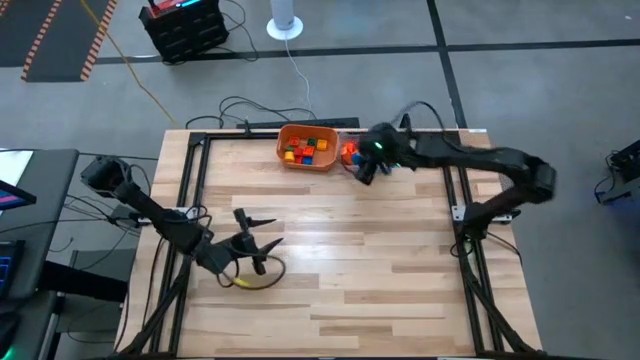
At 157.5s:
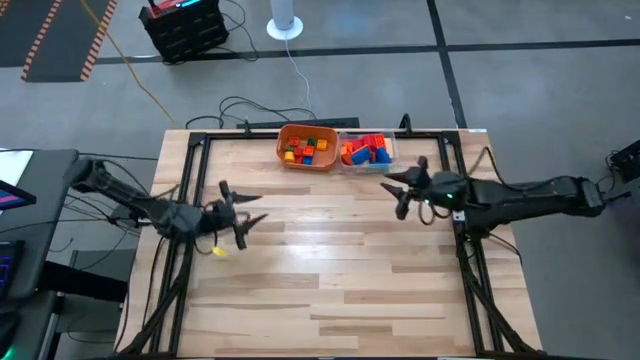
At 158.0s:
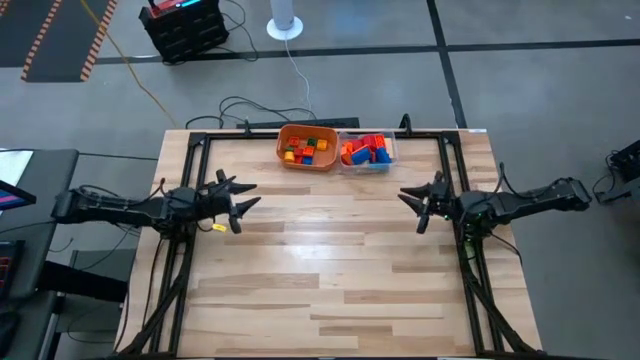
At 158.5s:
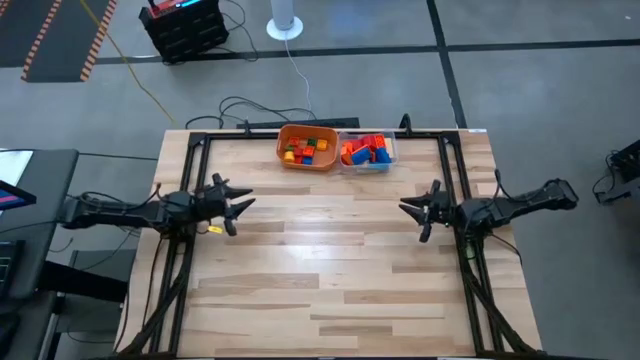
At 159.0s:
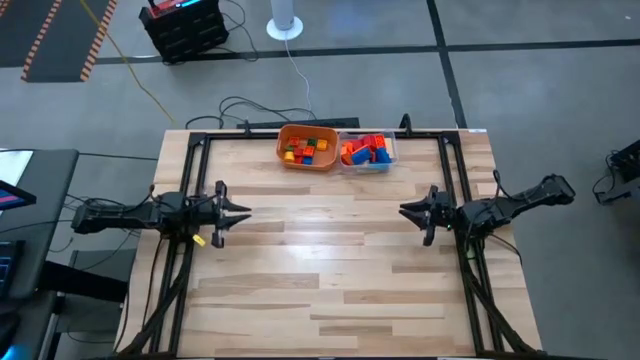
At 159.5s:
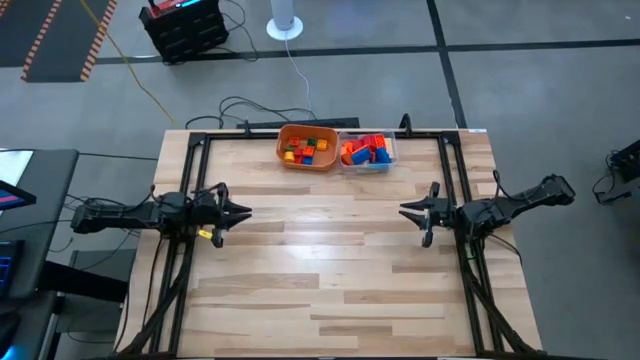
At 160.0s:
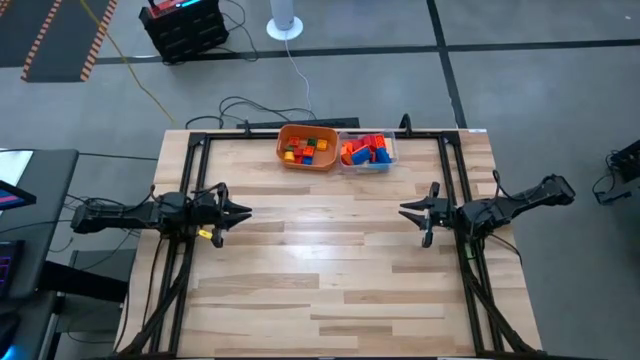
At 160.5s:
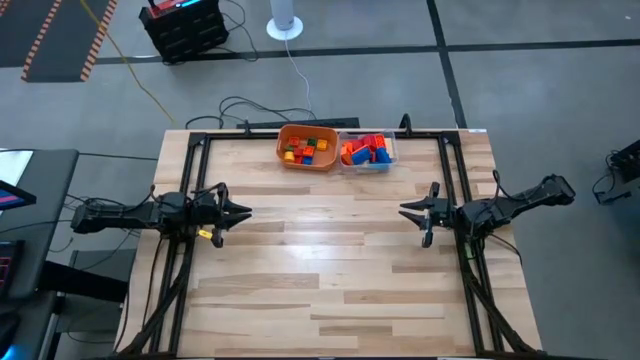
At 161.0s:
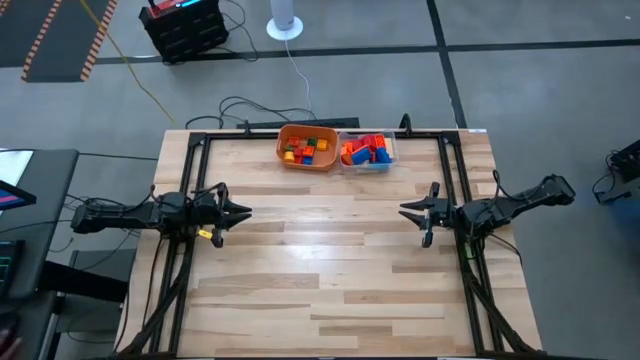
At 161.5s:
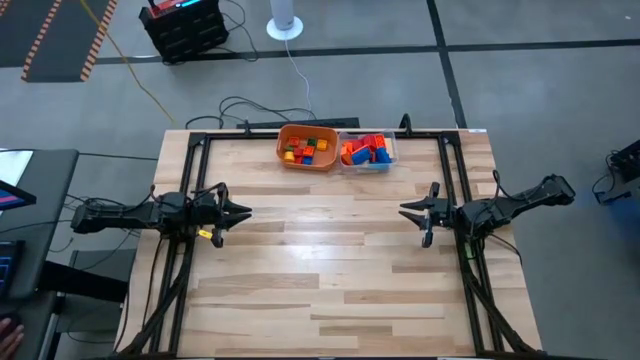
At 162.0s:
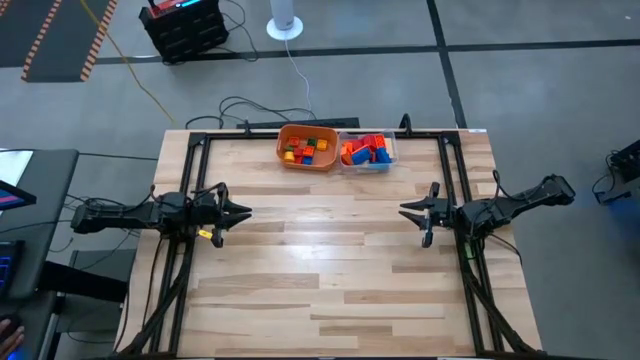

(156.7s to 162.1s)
Task: Sort blocks by size
Return to Home Position

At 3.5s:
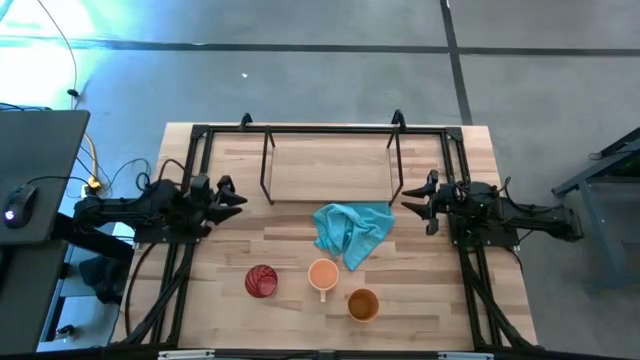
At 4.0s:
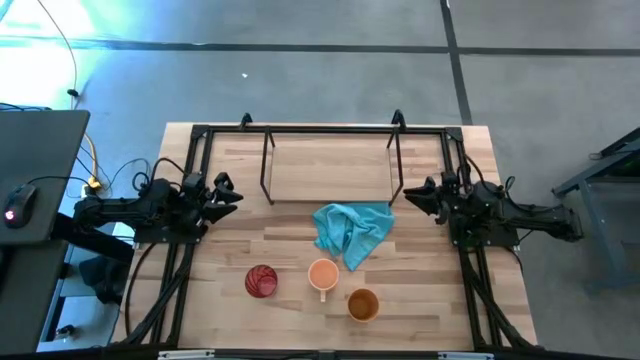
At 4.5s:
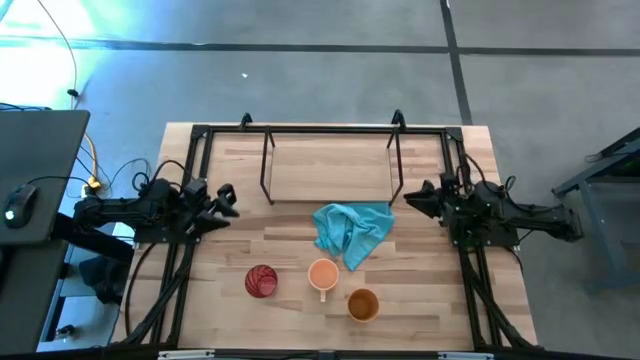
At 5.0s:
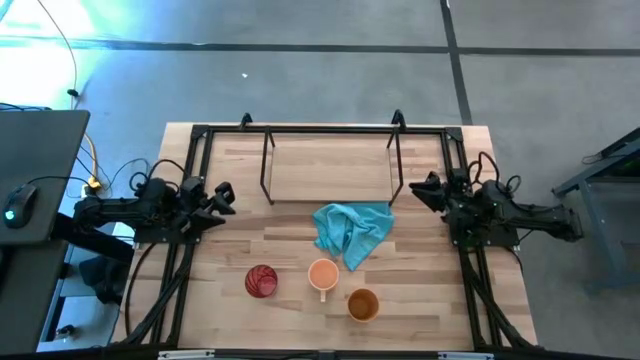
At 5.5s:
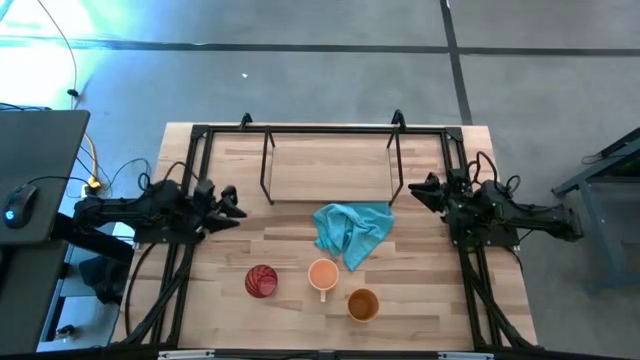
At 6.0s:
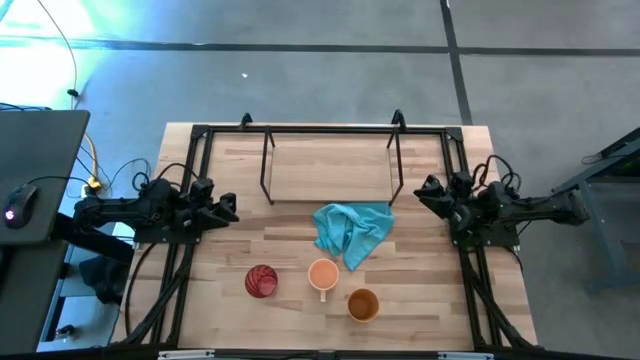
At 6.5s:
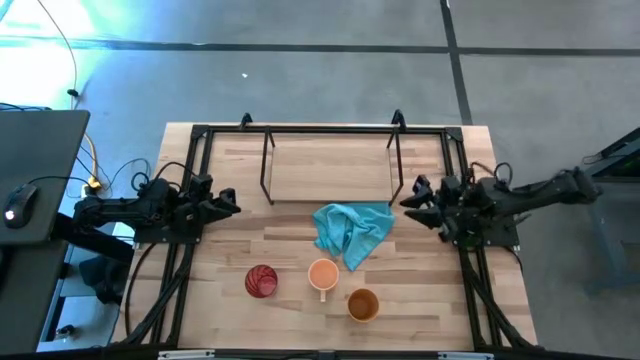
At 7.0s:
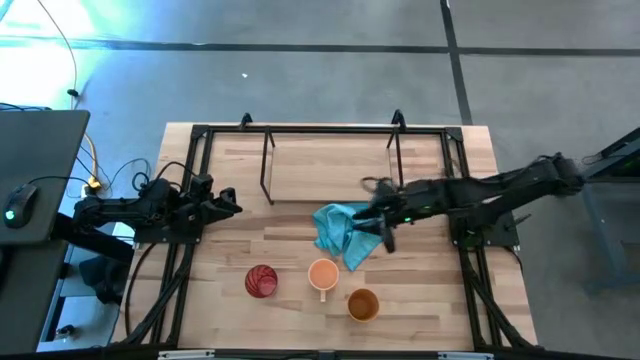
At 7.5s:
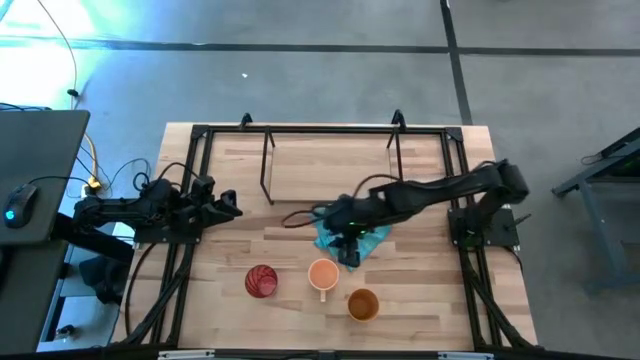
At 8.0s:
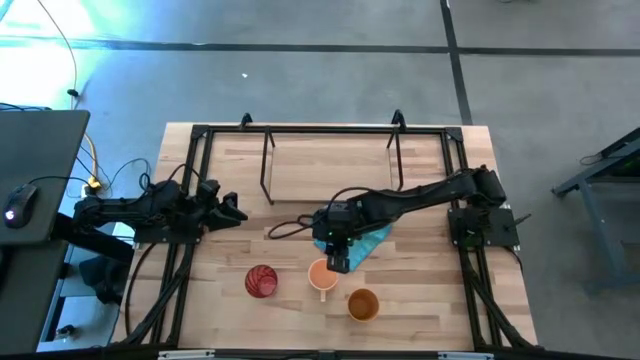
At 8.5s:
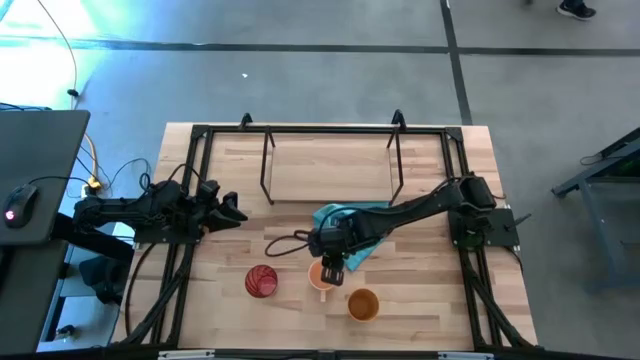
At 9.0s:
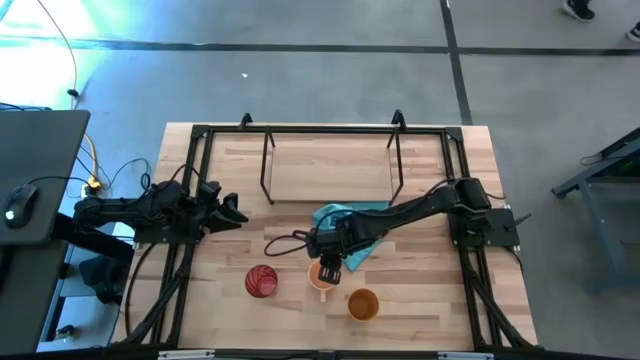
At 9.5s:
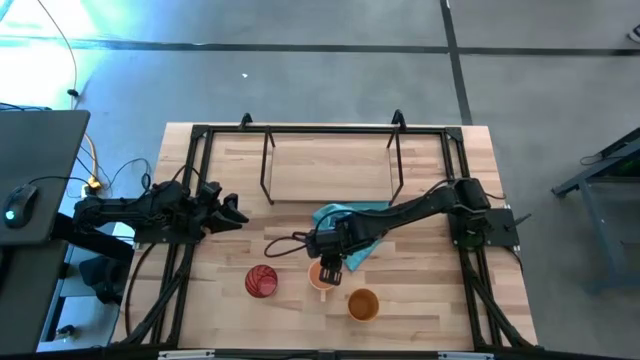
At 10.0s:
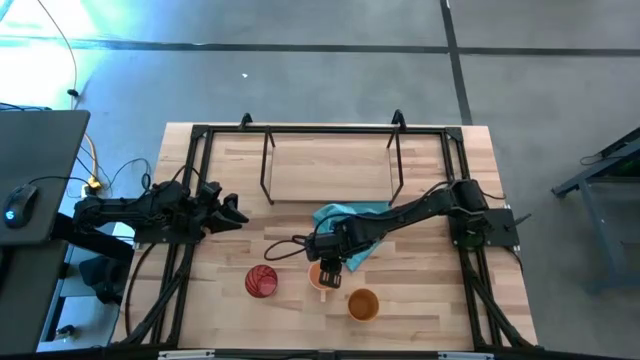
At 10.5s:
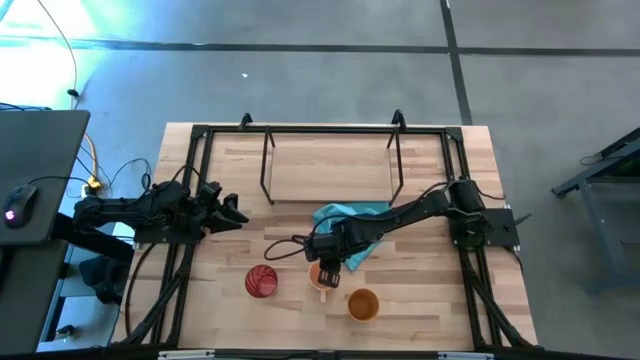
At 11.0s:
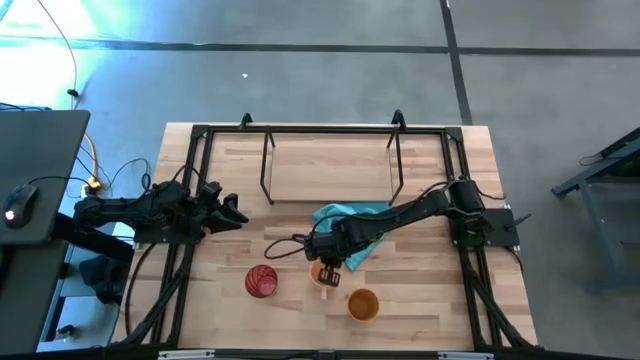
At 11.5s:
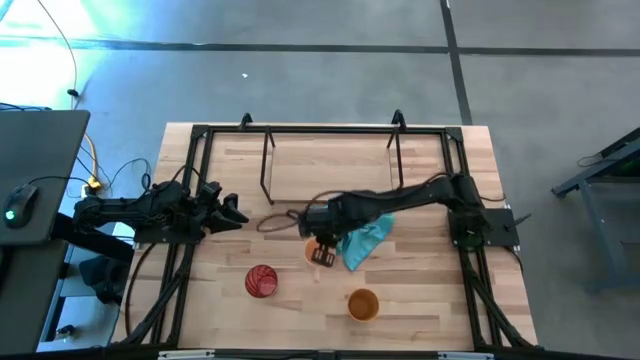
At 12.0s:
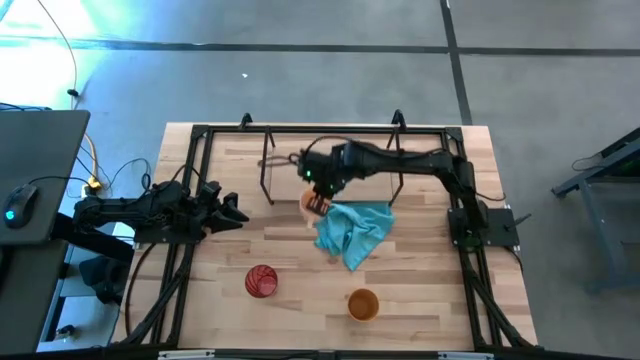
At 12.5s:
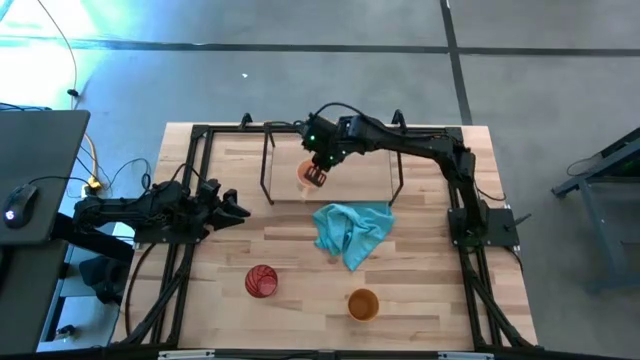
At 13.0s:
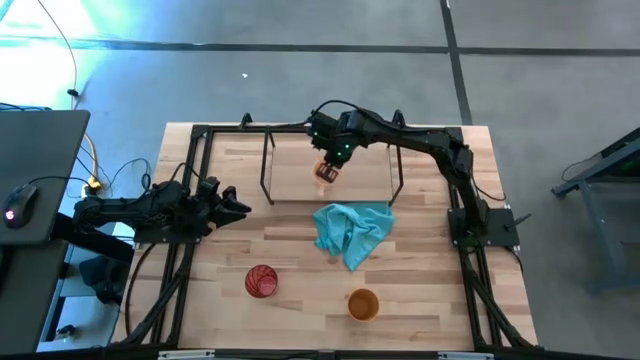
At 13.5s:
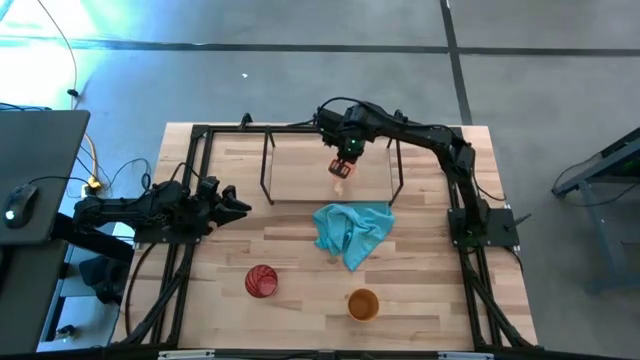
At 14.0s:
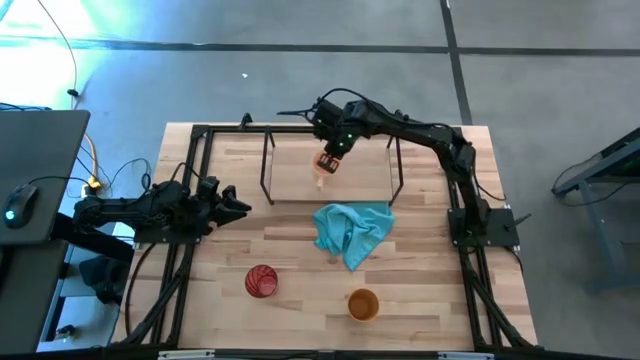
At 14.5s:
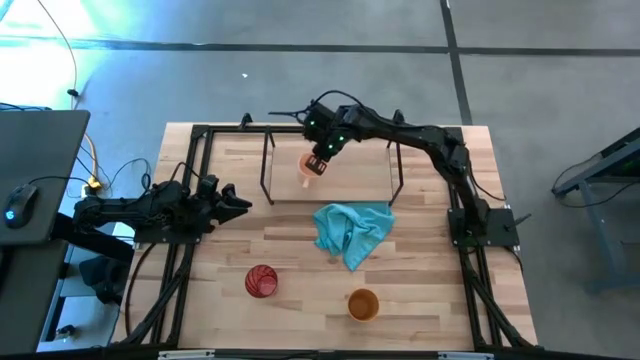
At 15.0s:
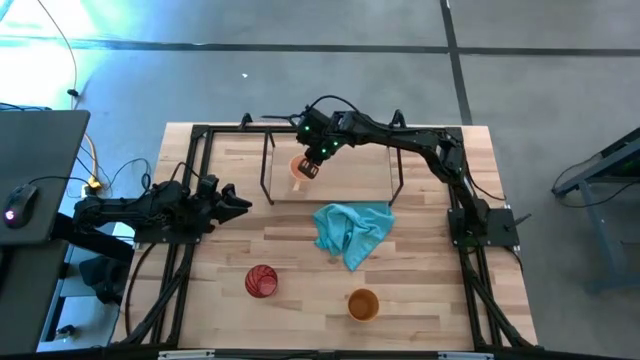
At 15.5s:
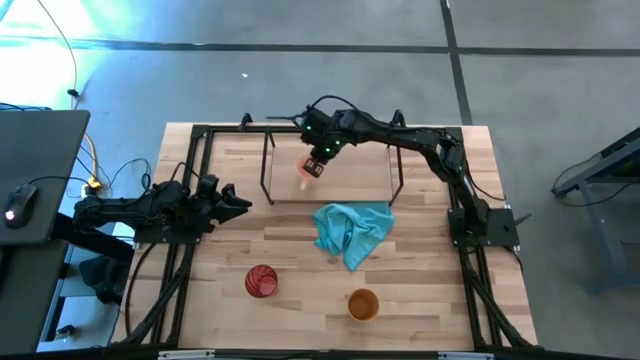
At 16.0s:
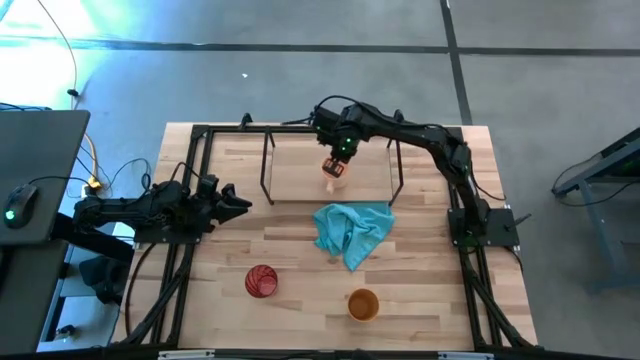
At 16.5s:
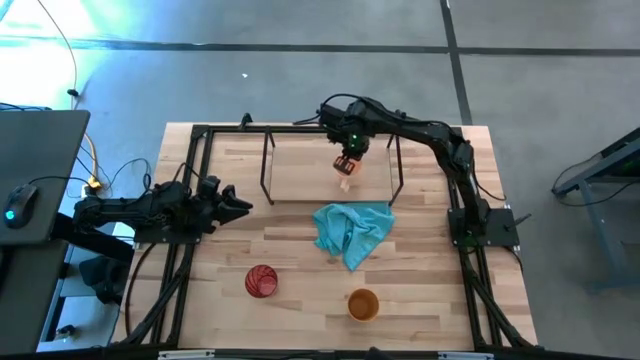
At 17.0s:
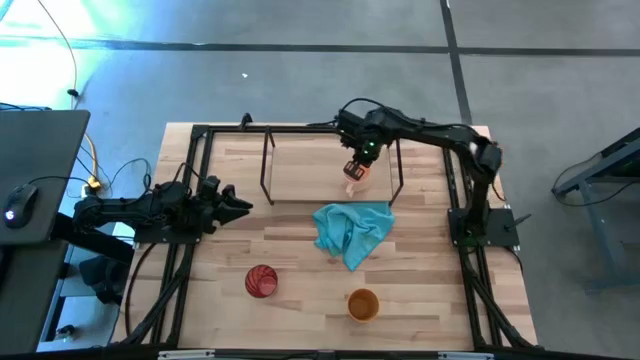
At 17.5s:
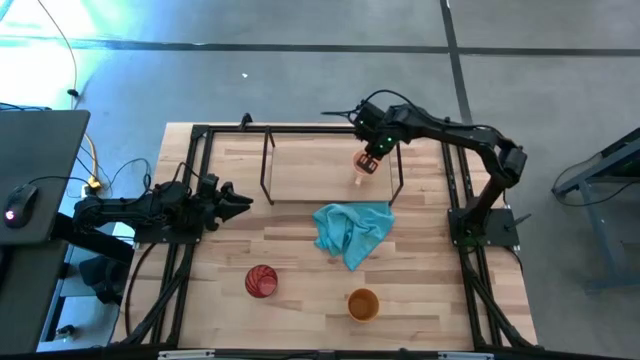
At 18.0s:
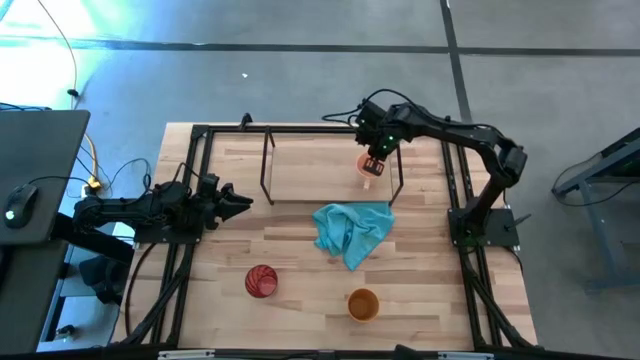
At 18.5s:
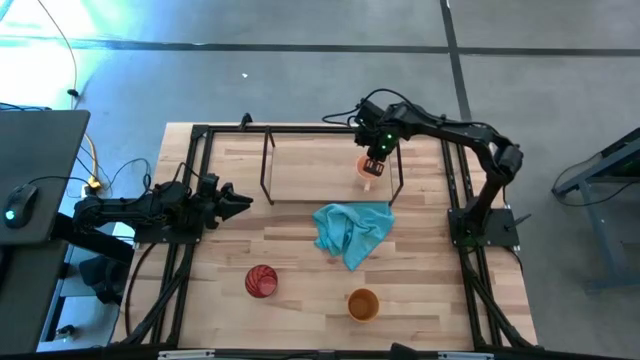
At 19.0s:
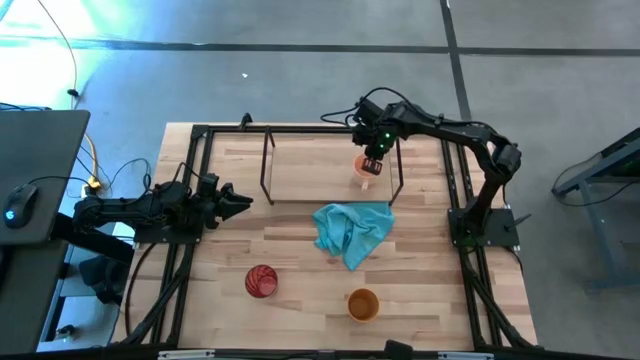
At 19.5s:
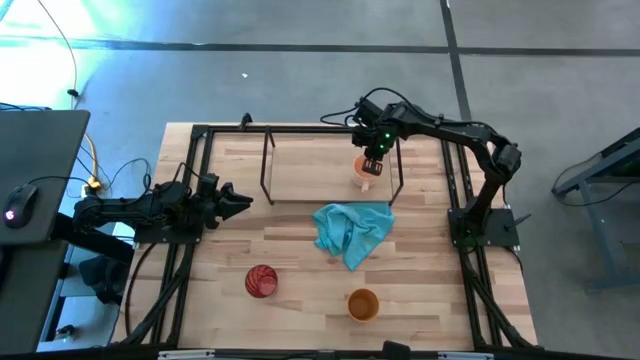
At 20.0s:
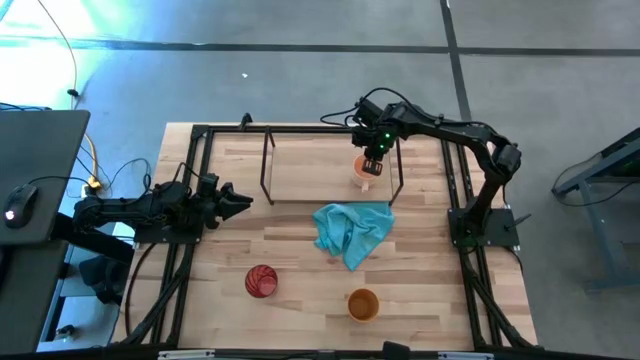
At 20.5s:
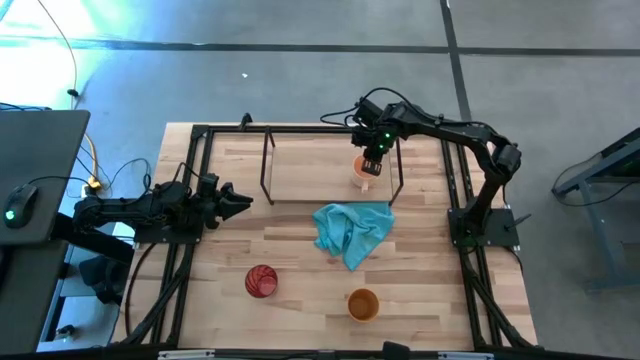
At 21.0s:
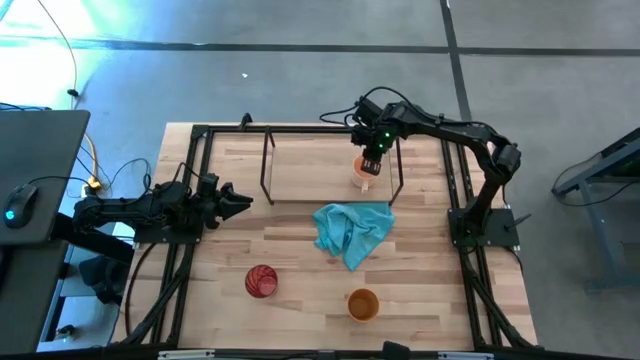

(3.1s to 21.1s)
Task: Stack small to large cups/mugs on shelf
Put the light orange mug on the shelf
